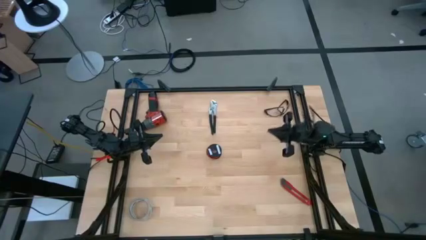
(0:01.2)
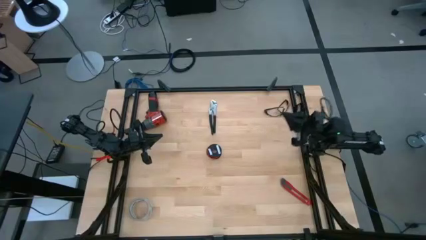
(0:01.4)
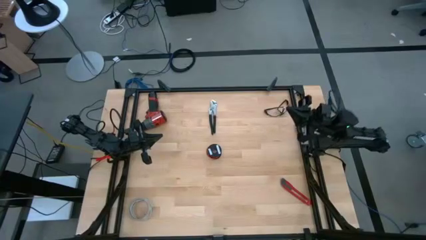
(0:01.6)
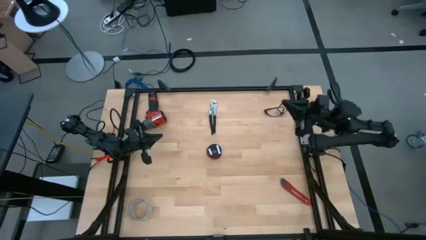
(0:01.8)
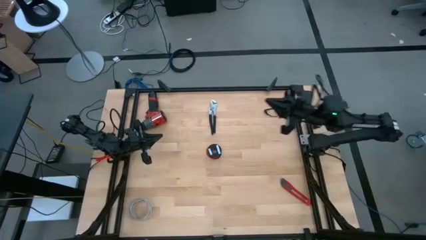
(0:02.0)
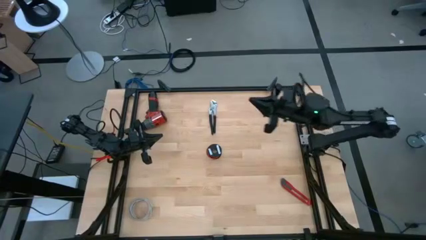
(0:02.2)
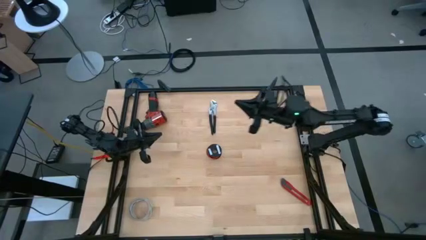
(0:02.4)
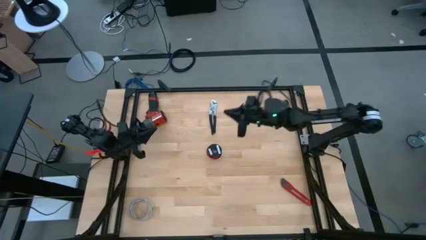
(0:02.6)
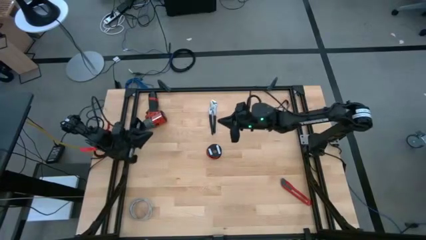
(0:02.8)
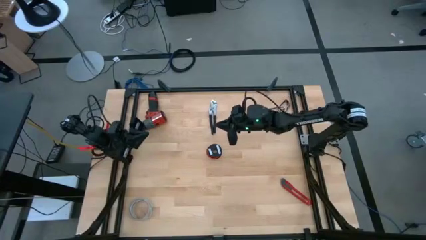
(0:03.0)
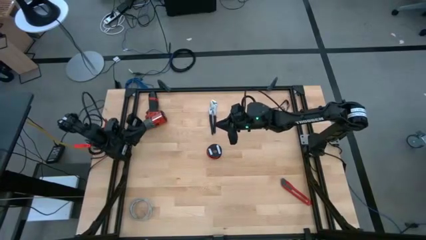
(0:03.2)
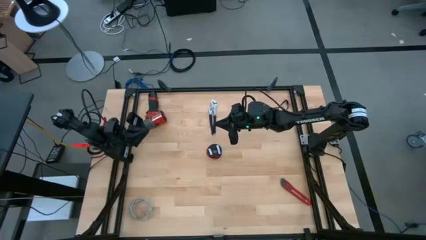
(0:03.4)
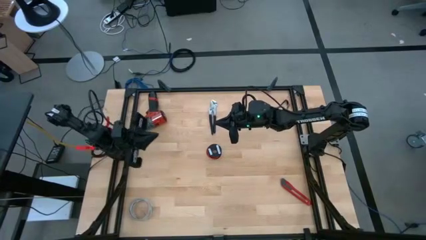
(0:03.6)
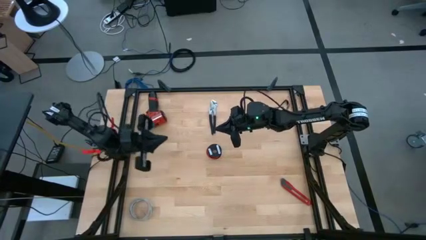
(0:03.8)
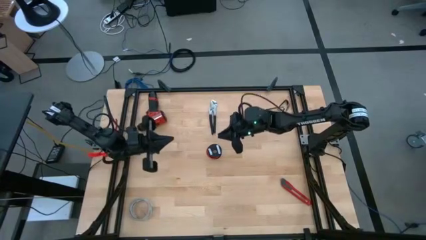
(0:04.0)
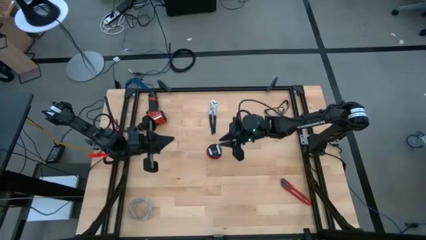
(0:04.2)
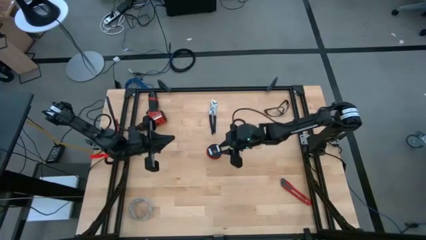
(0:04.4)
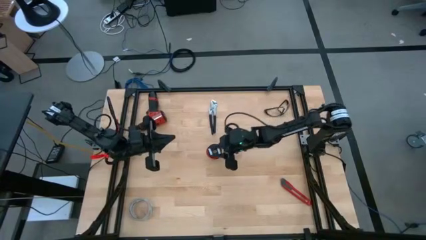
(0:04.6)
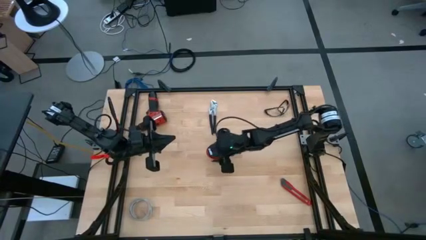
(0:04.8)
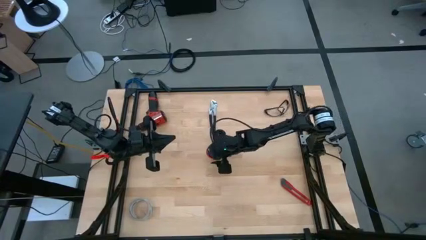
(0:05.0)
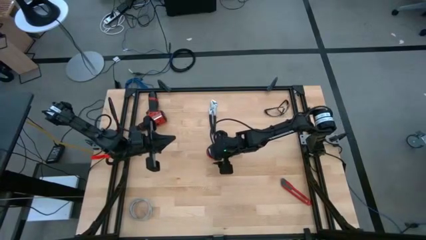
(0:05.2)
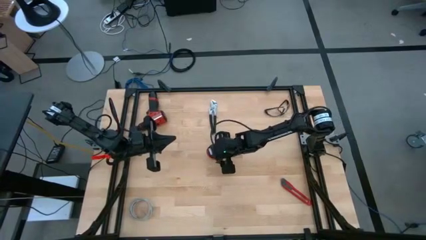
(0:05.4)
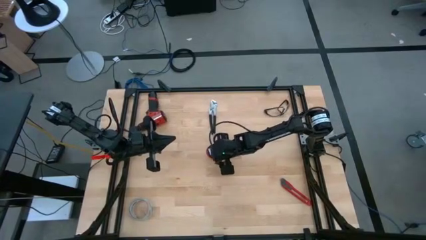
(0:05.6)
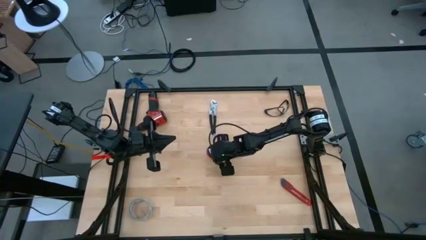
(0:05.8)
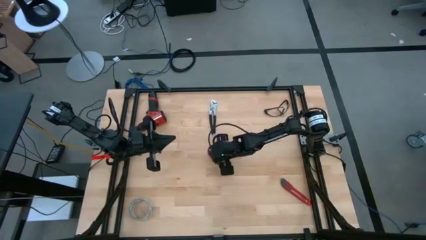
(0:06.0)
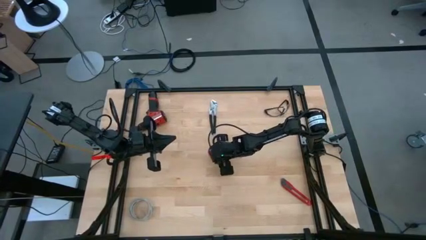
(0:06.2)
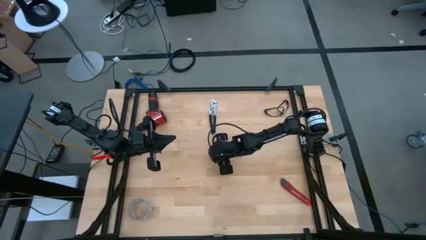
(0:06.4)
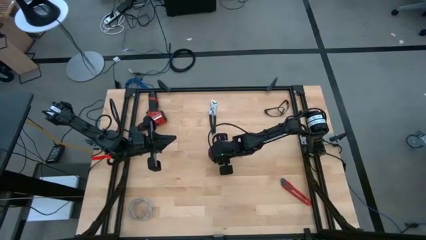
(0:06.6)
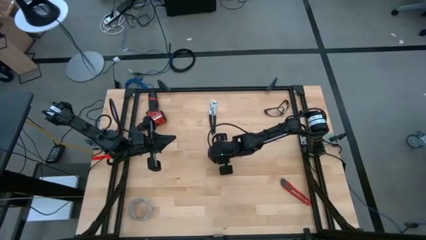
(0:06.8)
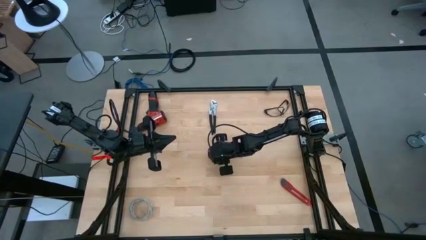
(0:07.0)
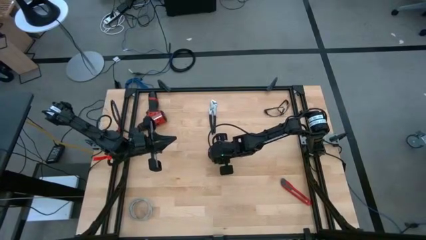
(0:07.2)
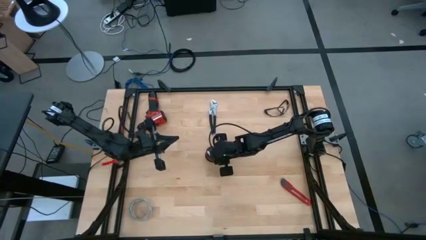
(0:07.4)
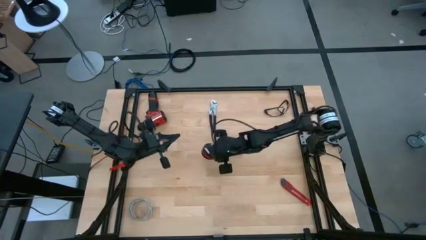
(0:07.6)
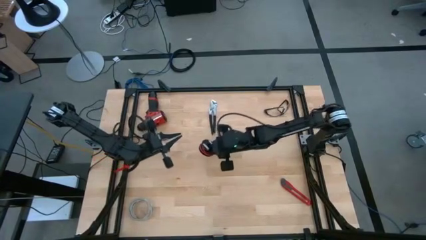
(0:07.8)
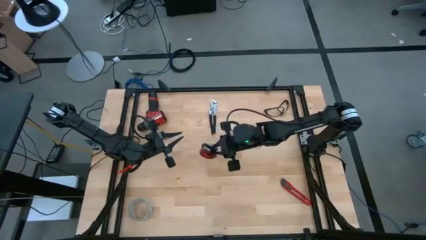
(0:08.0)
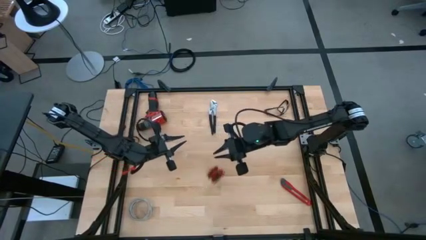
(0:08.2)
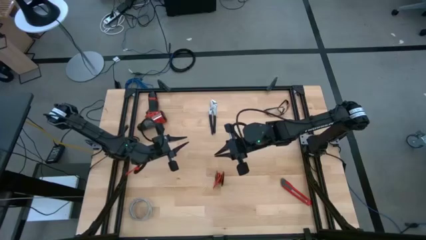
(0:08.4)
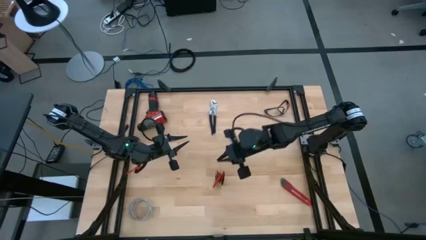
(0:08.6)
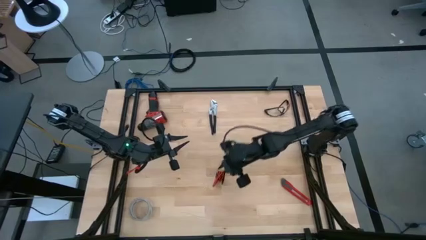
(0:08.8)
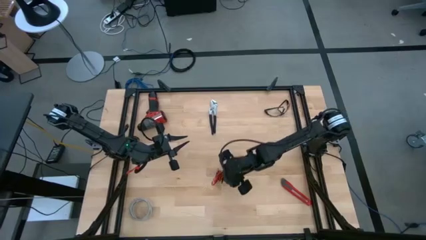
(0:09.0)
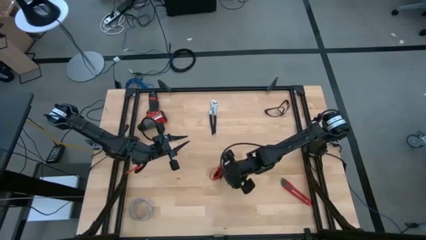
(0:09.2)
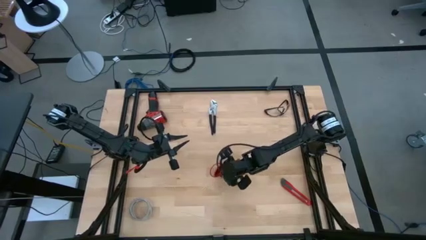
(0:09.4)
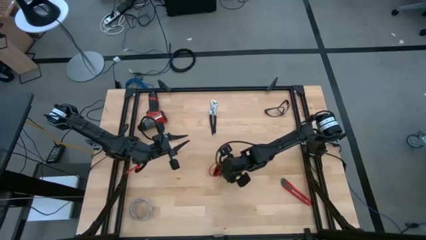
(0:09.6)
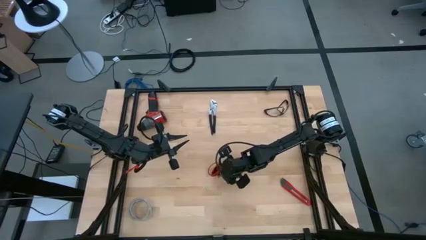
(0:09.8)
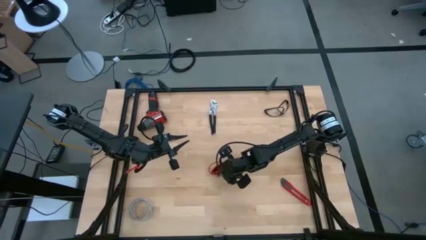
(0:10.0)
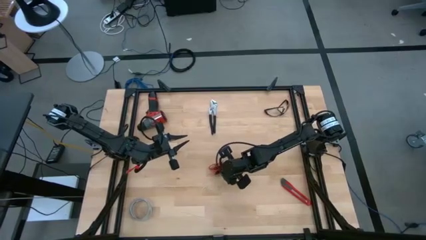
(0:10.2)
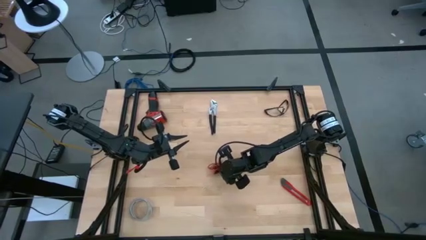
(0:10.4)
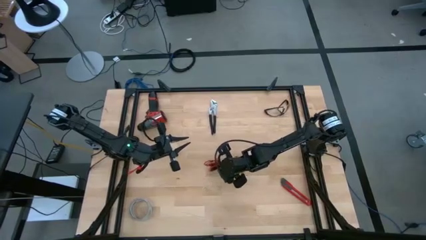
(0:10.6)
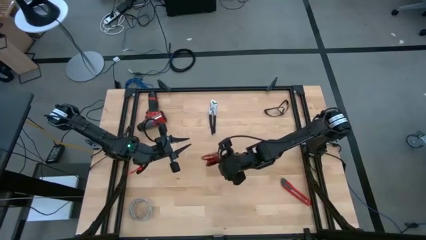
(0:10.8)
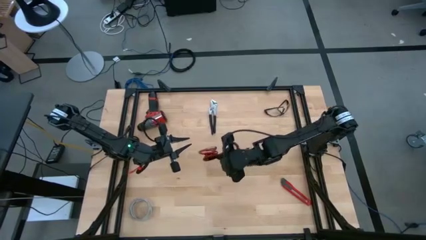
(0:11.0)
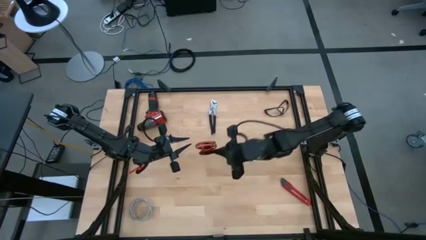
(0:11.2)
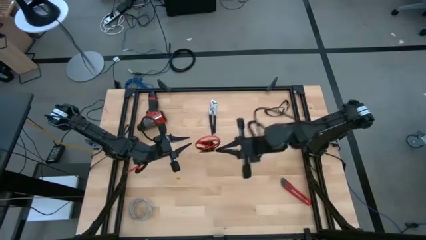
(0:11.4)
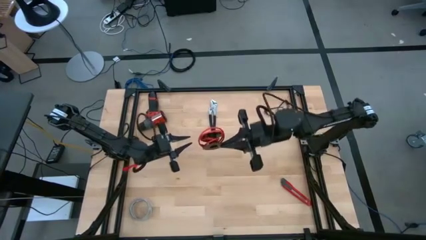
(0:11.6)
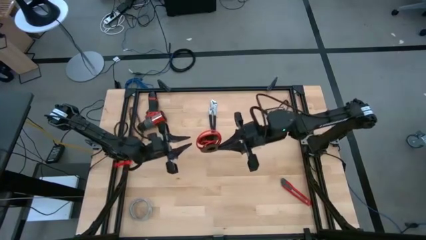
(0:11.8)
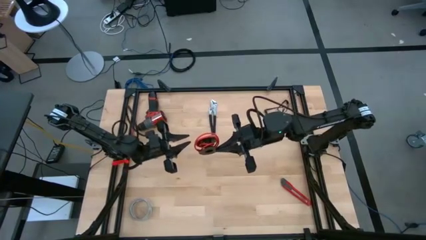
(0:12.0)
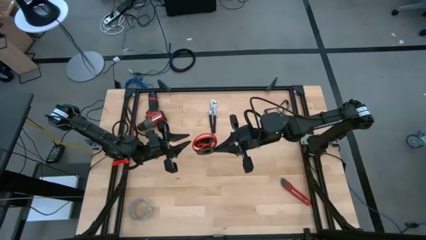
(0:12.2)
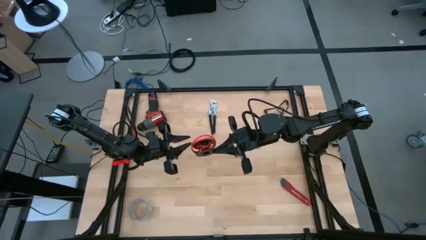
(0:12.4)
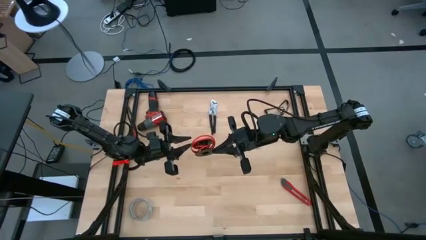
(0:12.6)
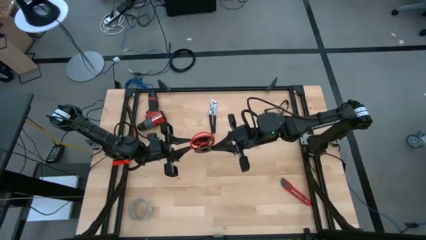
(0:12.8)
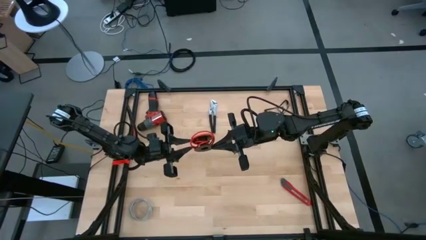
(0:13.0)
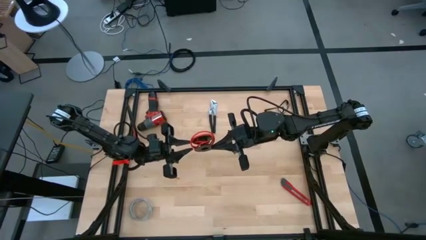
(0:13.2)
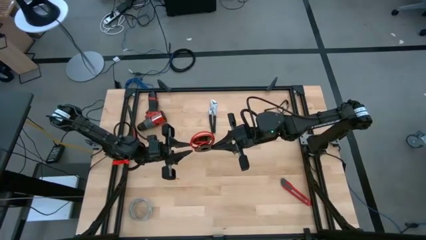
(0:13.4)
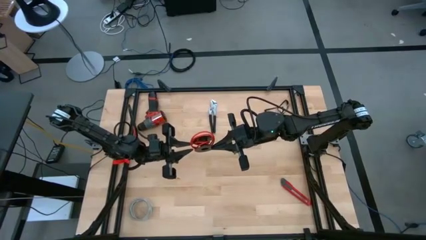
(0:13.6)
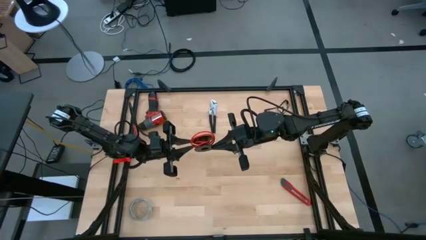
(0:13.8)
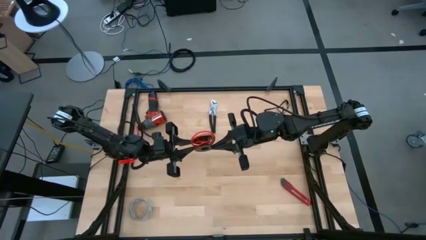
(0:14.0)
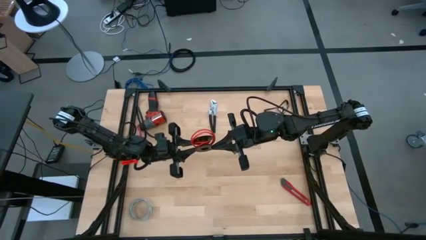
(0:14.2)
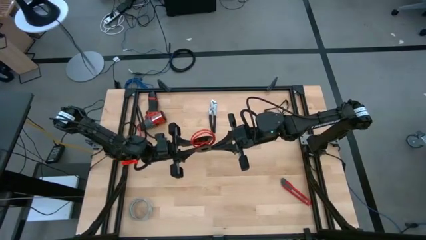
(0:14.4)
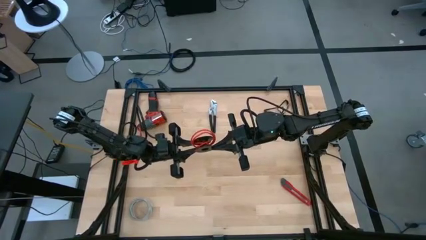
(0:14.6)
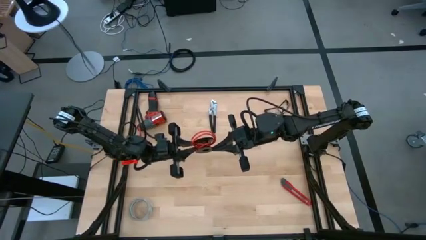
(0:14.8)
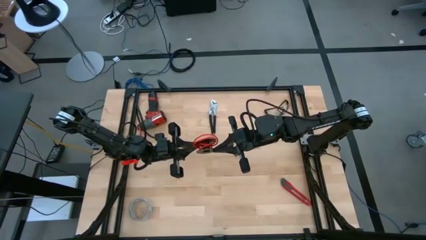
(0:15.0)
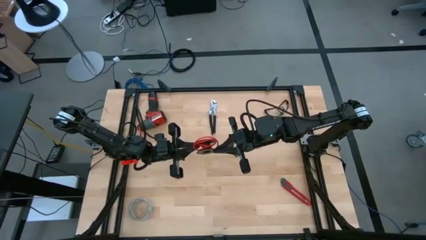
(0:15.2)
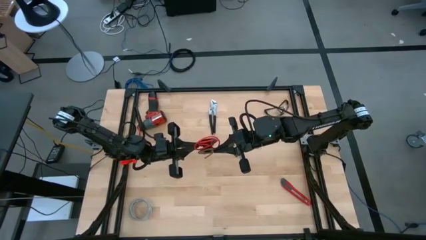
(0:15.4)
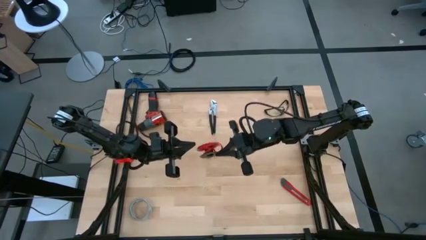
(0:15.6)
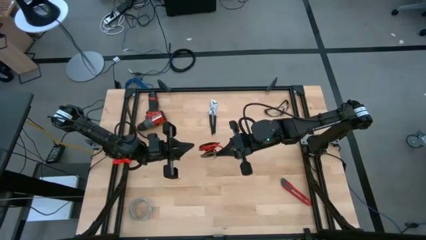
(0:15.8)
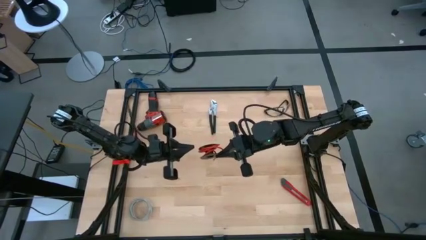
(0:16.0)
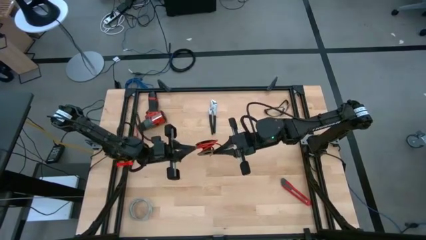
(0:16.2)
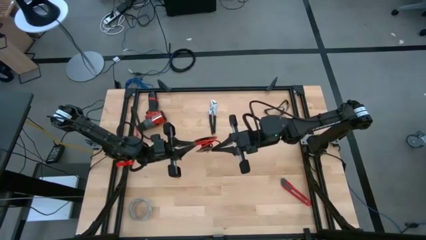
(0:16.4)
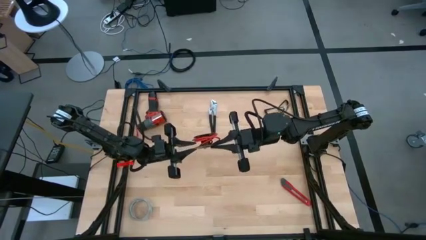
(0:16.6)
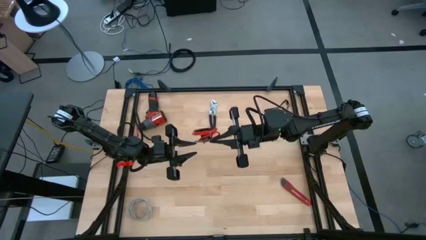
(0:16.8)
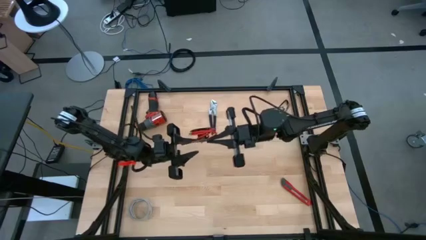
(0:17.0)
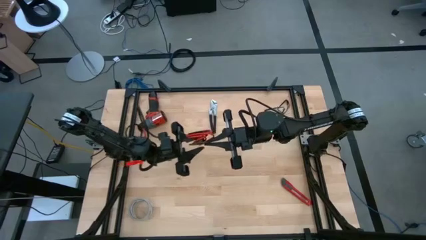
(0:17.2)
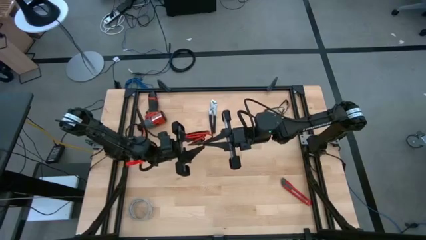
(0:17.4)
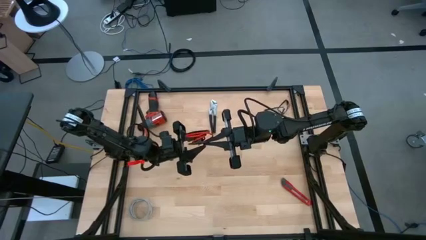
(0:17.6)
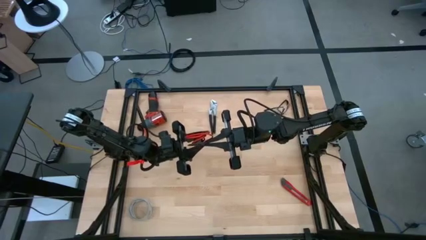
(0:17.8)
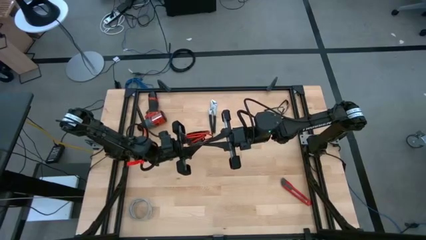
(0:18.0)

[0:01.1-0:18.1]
Task: Coil cords
Uncoil the red wire from the black spool
